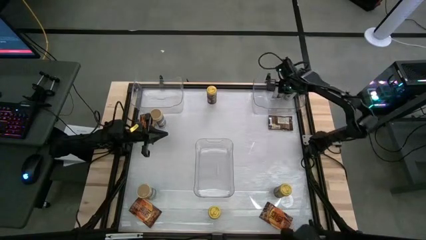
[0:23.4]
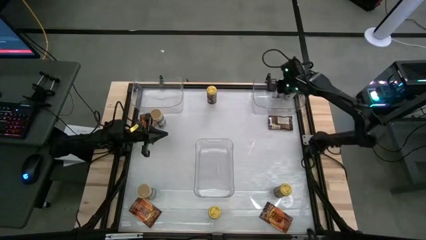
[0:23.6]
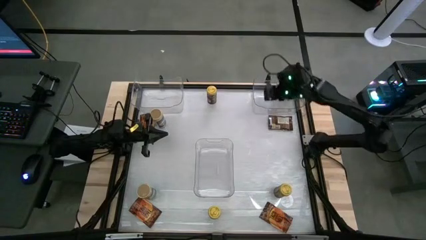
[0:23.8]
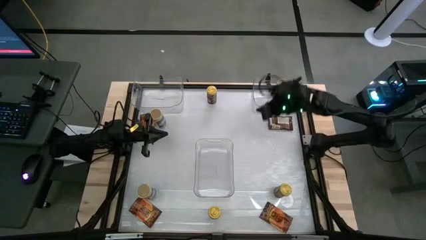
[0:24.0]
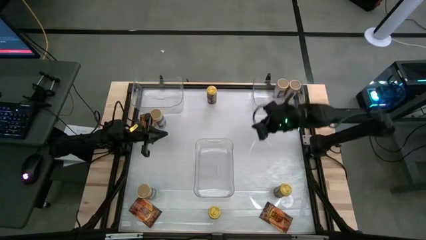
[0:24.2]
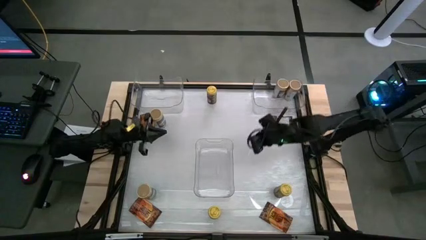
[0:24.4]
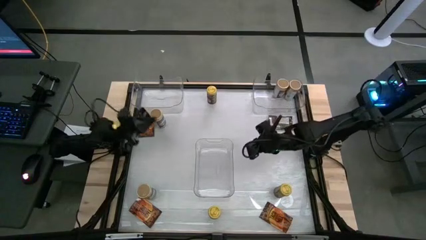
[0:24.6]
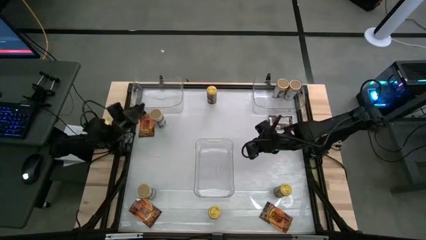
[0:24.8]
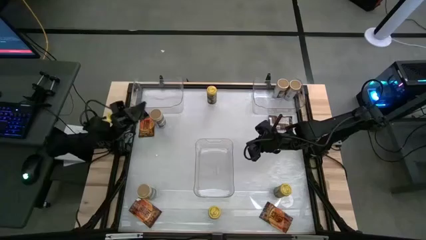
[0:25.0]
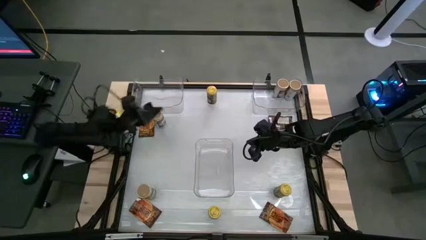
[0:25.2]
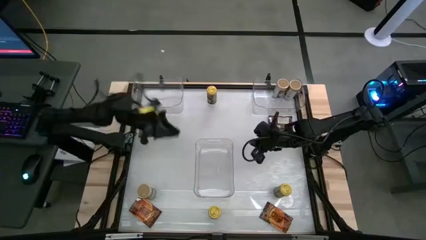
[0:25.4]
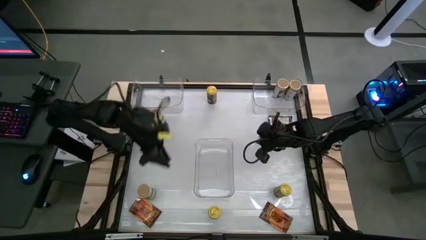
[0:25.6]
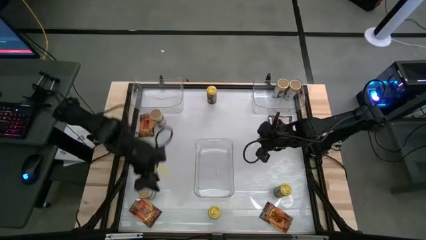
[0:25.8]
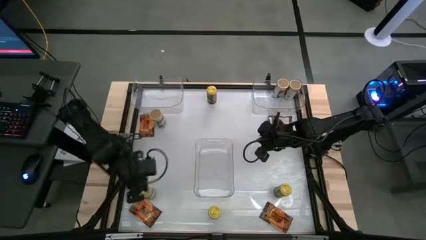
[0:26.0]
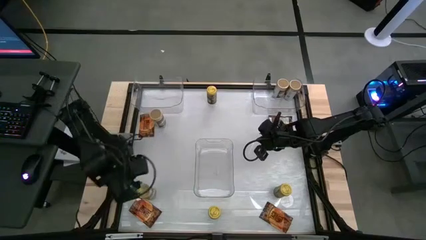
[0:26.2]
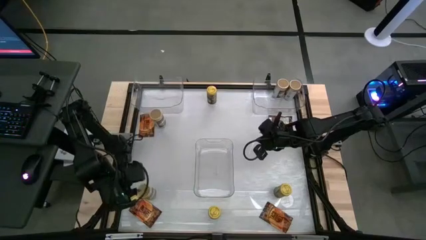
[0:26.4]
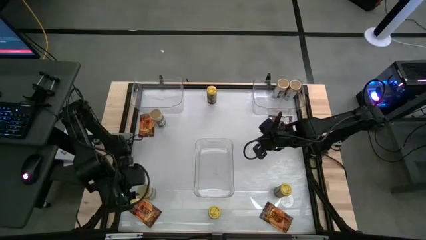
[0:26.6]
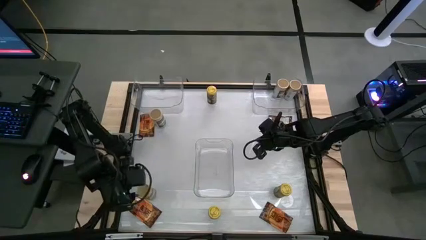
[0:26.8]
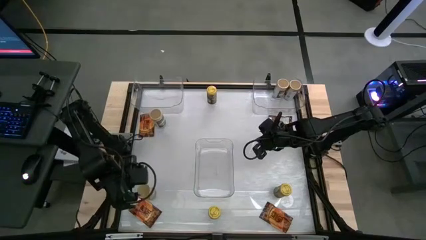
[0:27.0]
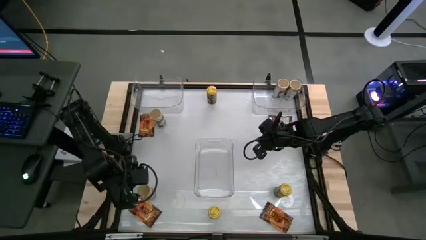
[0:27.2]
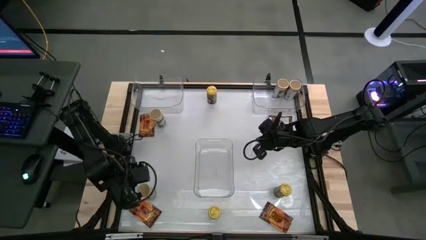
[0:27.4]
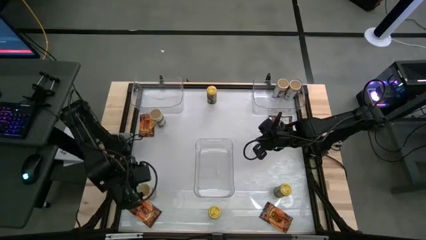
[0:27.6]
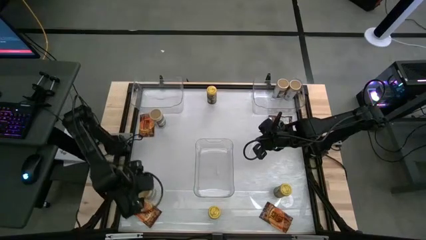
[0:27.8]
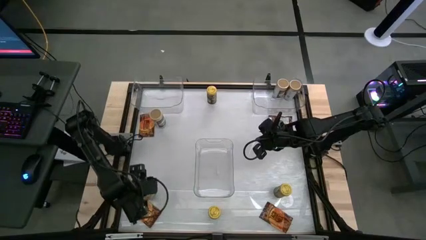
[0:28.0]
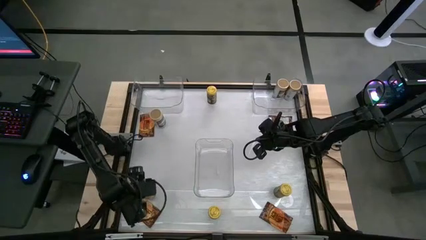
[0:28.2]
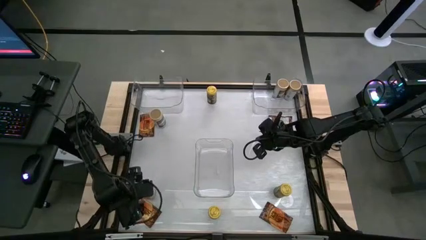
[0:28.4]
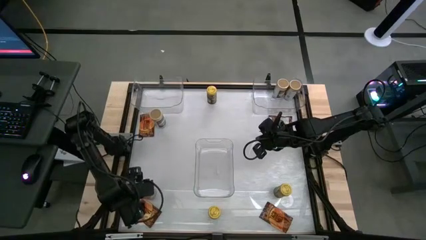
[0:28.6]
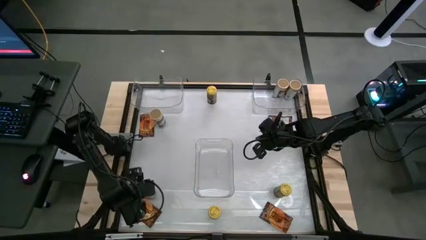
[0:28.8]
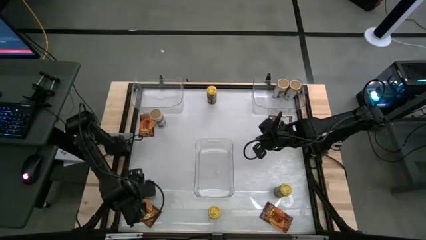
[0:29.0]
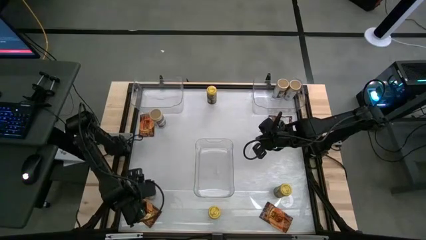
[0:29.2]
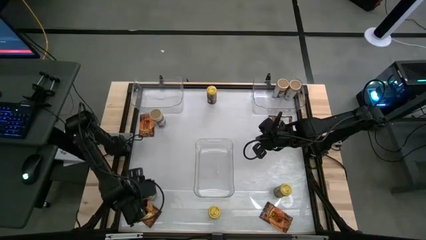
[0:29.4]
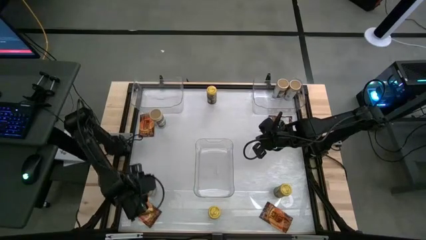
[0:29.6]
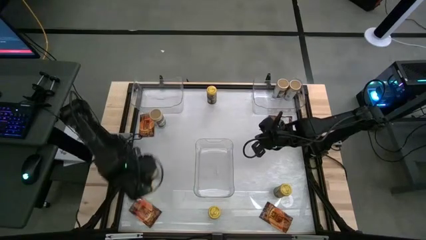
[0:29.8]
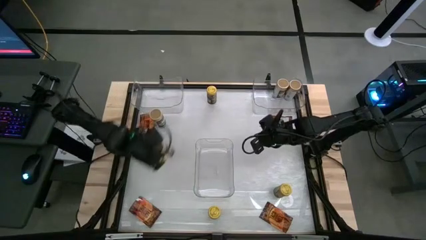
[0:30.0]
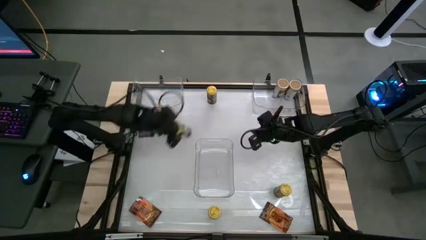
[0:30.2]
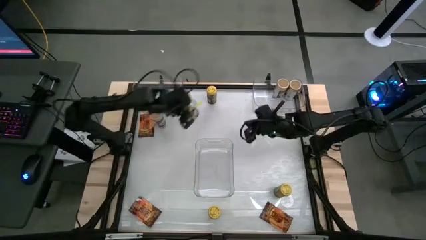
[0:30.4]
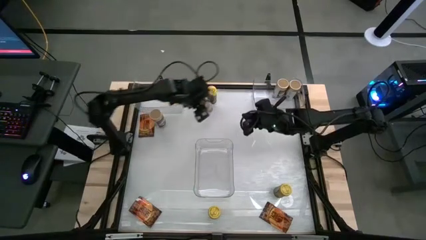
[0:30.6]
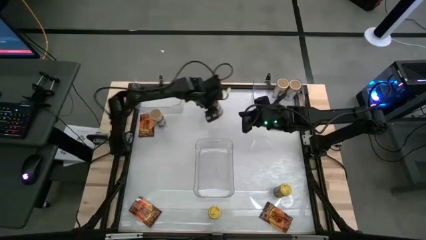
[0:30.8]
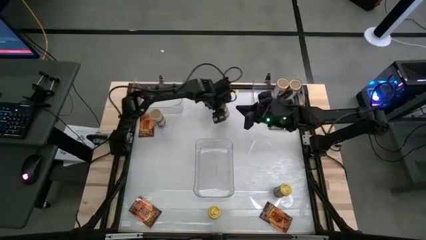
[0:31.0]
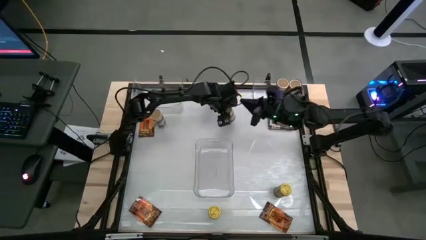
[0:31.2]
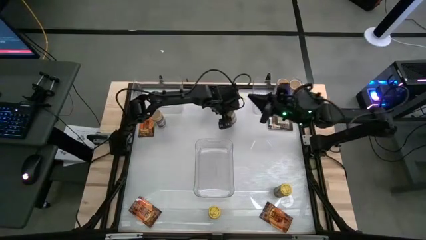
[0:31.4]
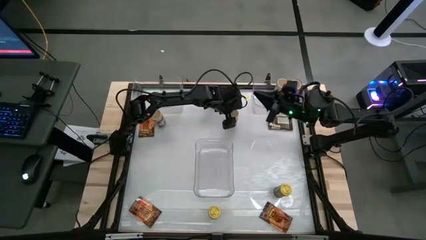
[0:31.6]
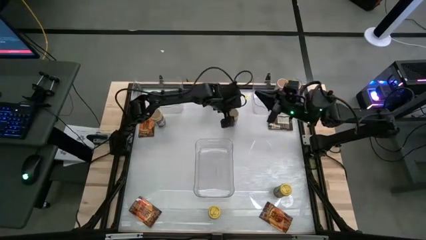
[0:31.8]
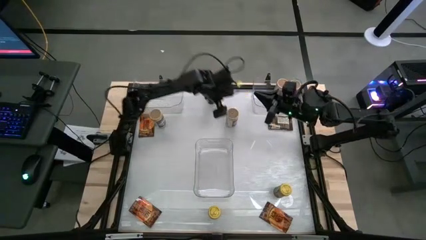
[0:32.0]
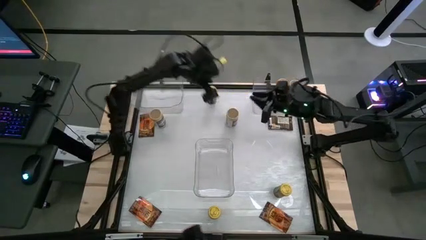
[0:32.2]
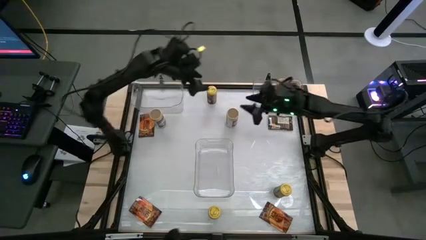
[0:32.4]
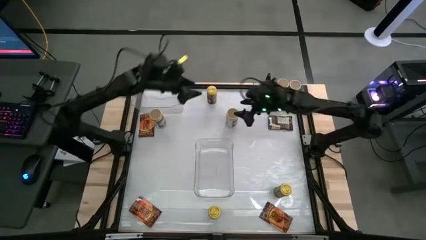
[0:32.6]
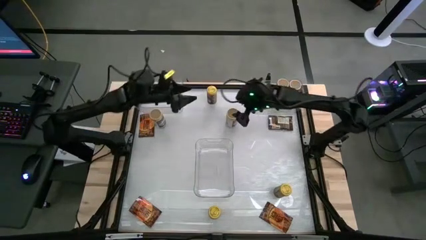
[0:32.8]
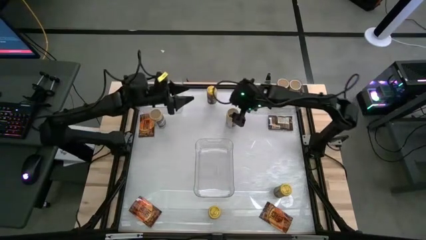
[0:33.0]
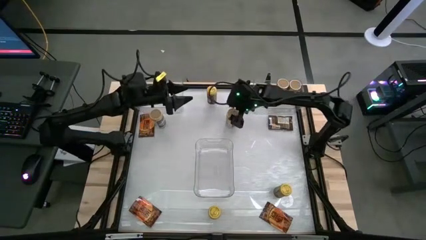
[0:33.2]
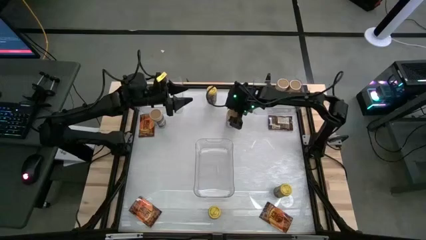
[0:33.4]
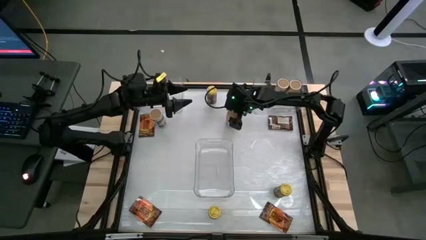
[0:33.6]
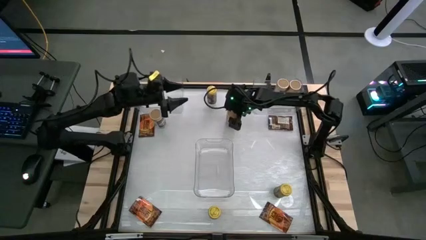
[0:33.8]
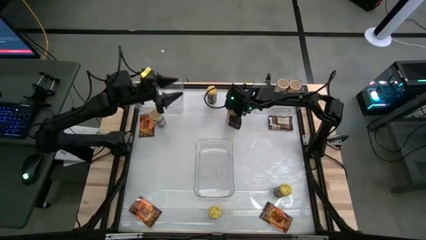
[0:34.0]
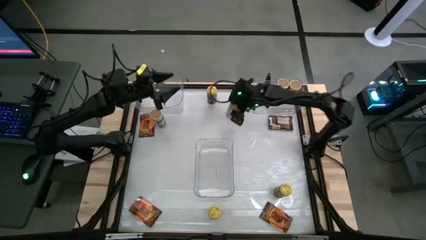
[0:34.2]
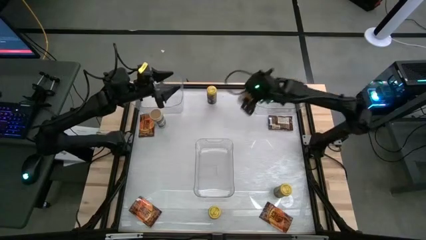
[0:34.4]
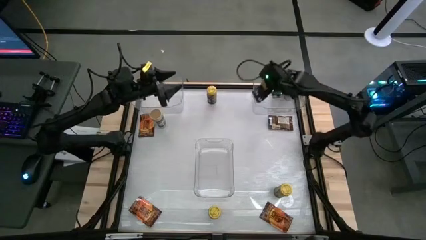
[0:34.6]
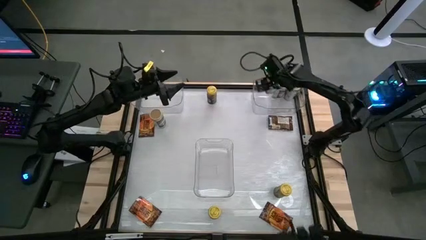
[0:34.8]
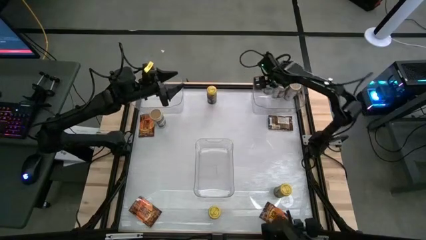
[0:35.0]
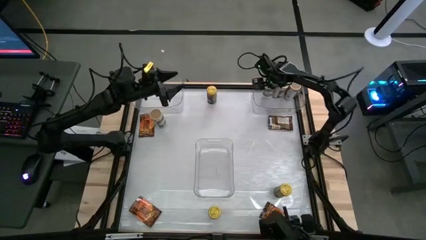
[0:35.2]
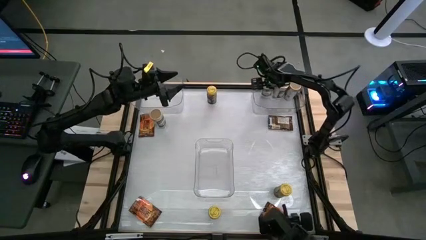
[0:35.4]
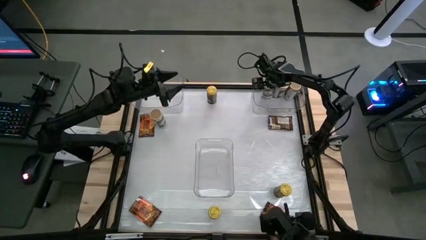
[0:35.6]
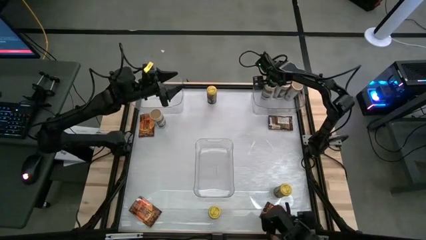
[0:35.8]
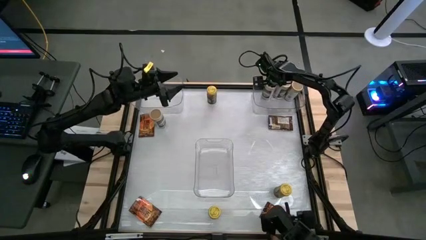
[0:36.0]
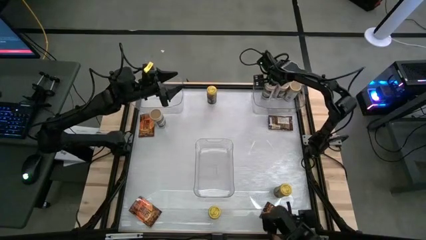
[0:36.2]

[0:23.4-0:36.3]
Task: Sort spices by type
Put the bottom brown seasoning bottle into the right transparent bin aligned with the other brown seasoning bottles

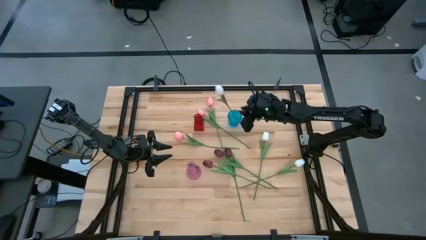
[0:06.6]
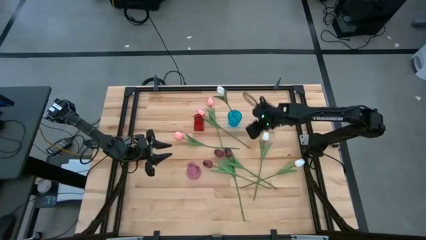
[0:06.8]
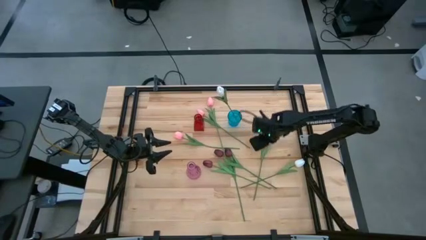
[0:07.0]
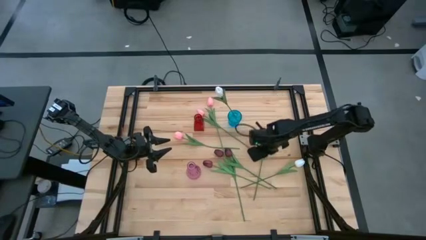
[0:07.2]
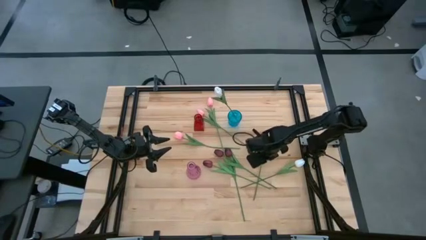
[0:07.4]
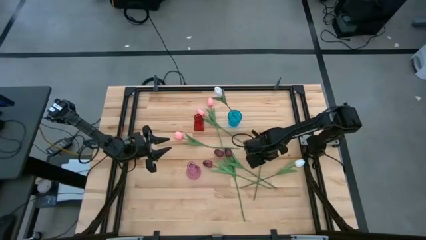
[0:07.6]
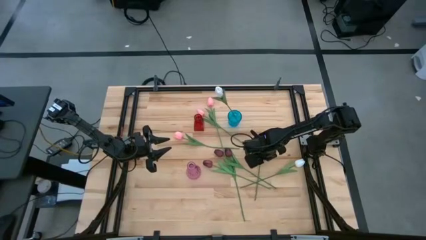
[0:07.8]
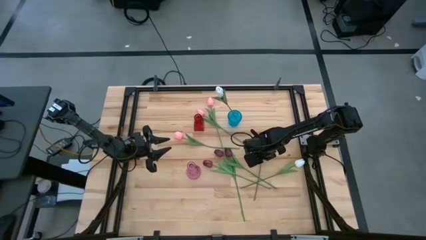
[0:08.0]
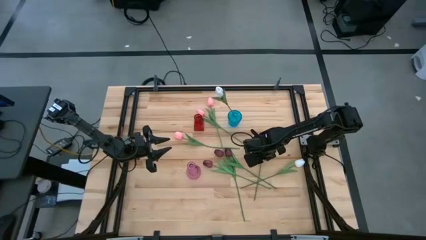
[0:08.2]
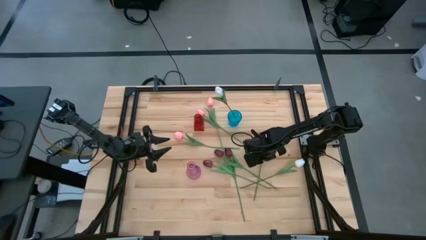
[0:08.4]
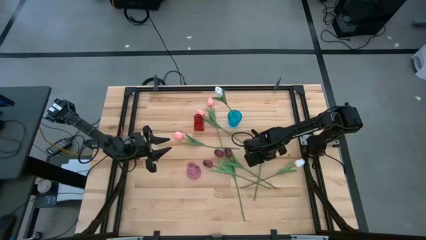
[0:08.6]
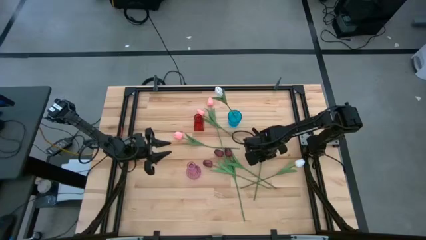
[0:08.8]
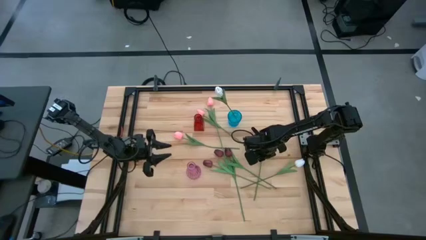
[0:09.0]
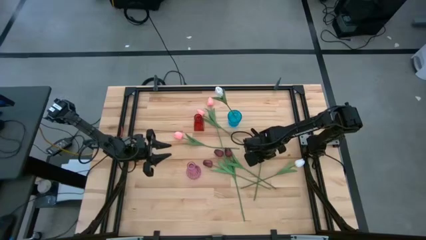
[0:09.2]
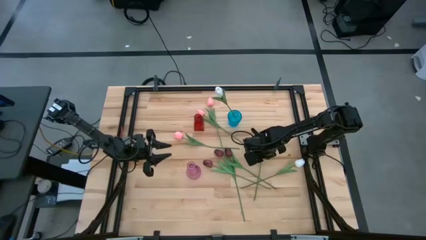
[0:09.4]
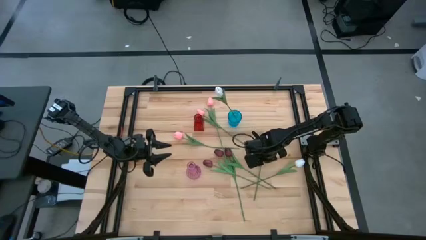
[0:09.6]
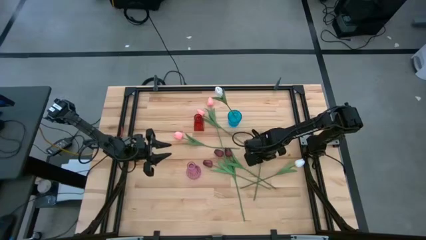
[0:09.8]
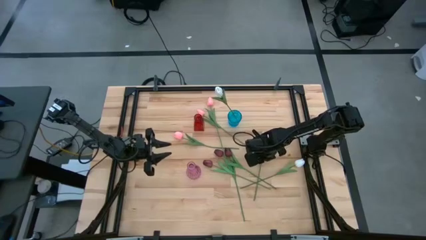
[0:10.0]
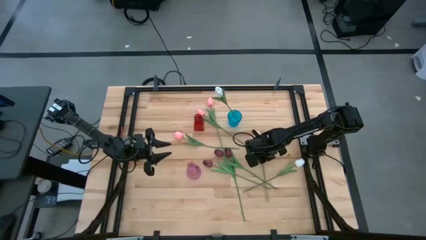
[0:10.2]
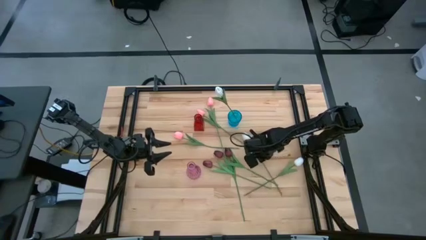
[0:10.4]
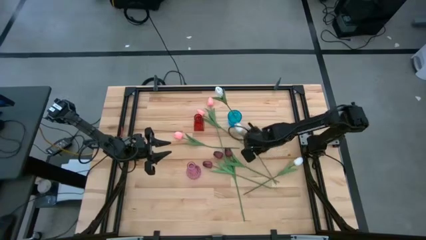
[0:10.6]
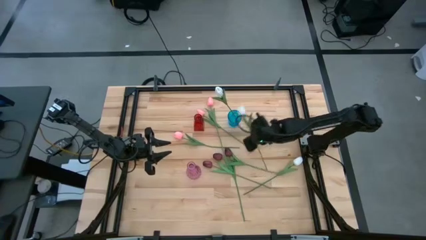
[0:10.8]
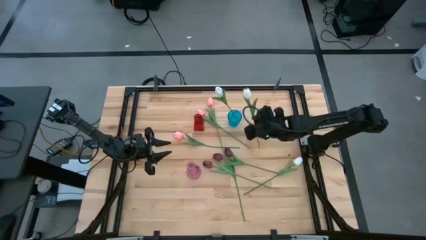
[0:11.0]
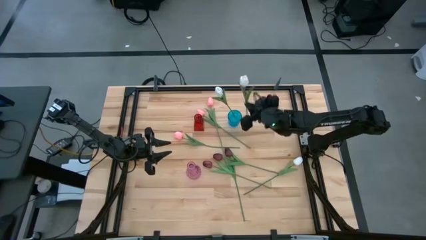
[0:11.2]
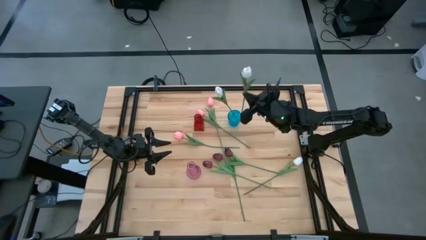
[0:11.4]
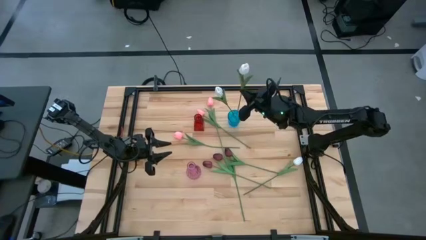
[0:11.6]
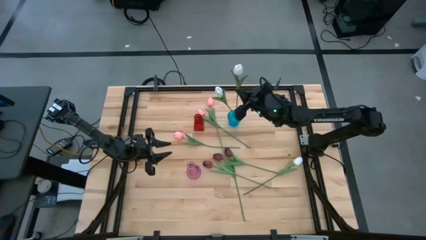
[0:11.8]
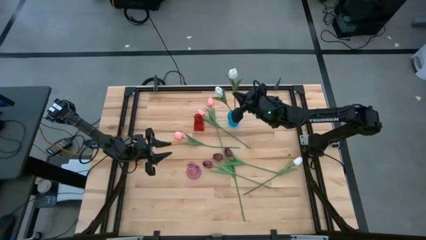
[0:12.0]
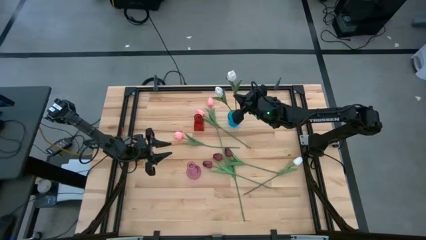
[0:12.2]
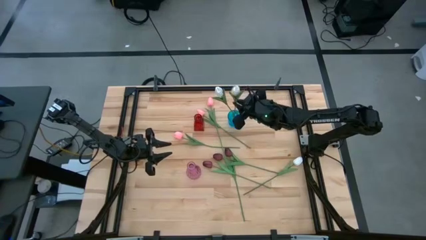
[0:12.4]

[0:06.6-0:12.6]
Task: Sort flowers into vase by color
Put the left white flower into the blue vase
